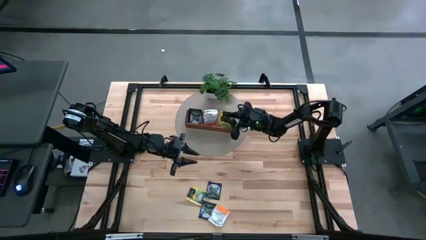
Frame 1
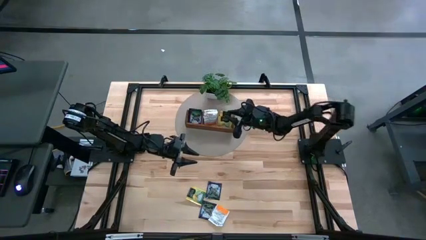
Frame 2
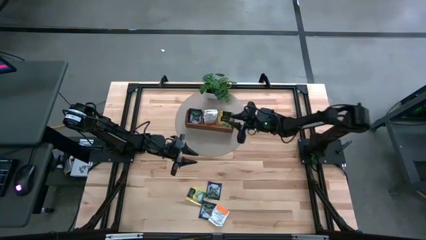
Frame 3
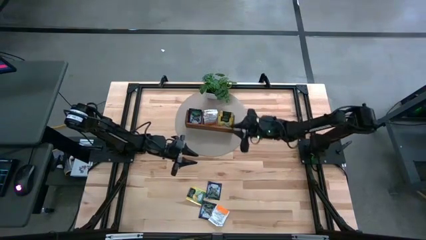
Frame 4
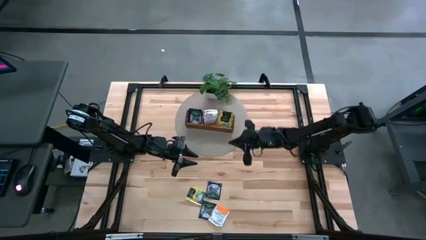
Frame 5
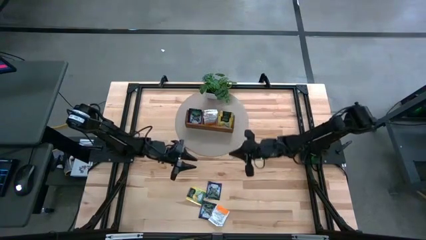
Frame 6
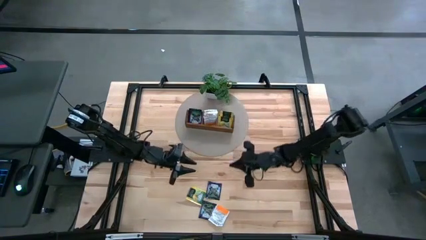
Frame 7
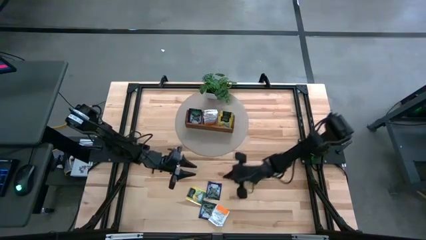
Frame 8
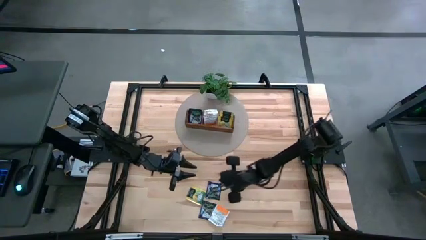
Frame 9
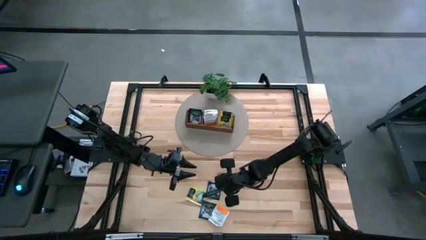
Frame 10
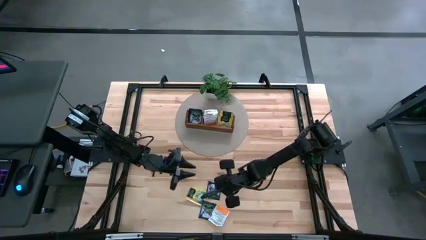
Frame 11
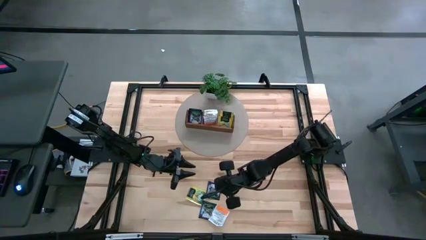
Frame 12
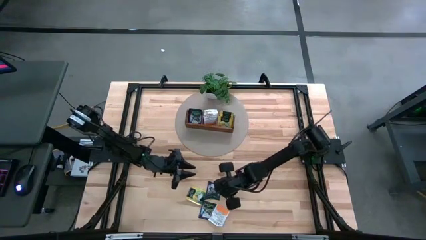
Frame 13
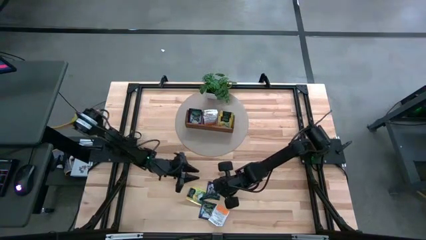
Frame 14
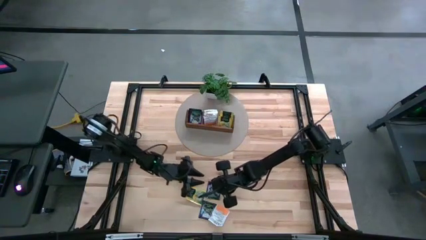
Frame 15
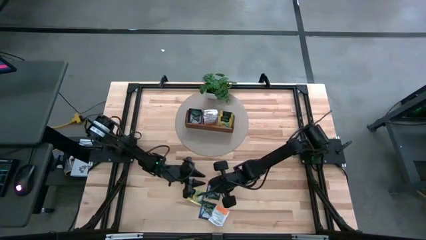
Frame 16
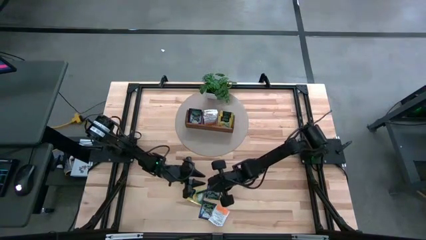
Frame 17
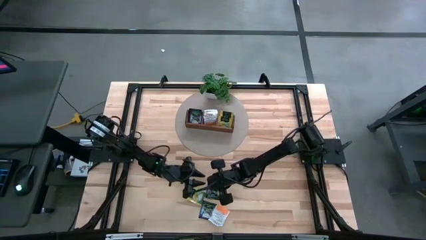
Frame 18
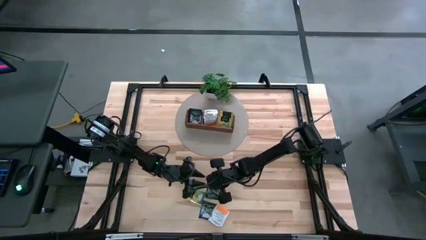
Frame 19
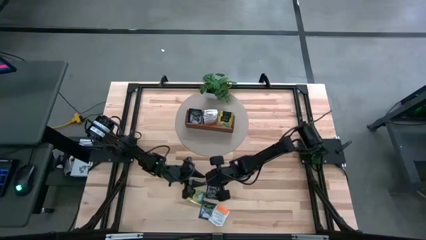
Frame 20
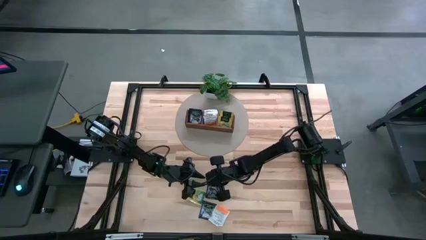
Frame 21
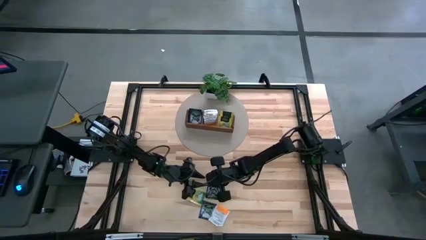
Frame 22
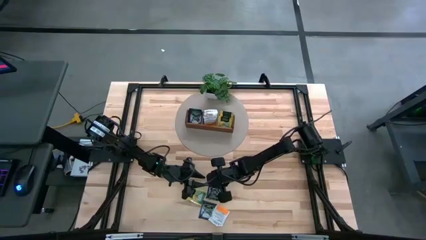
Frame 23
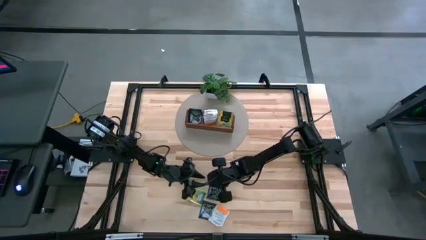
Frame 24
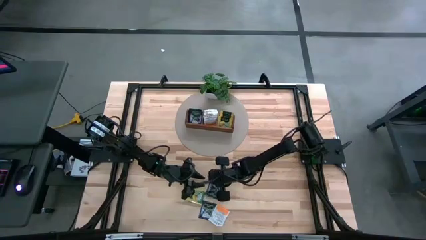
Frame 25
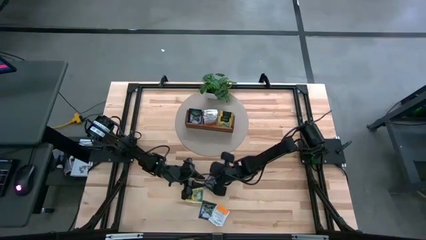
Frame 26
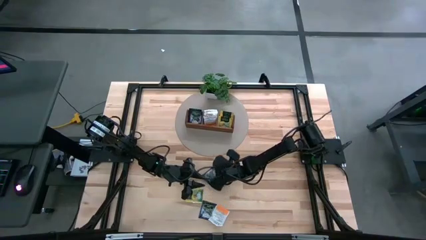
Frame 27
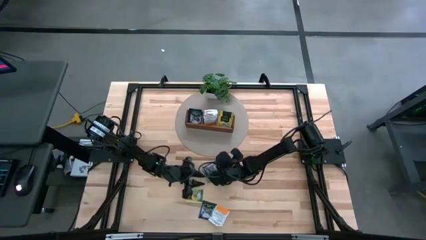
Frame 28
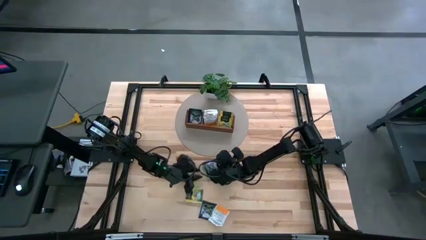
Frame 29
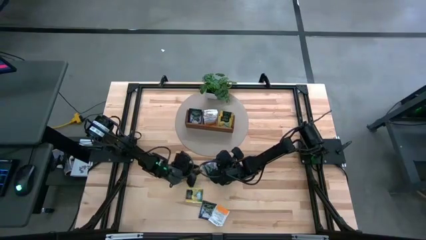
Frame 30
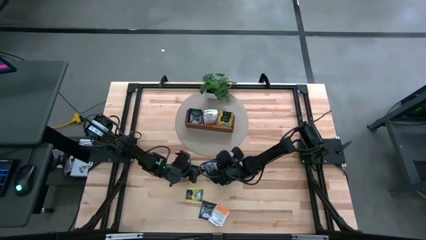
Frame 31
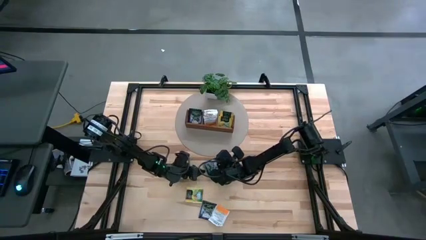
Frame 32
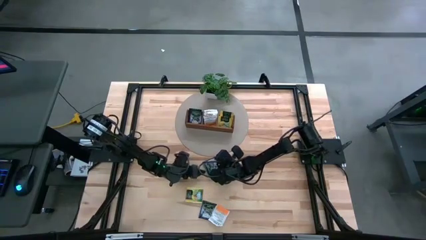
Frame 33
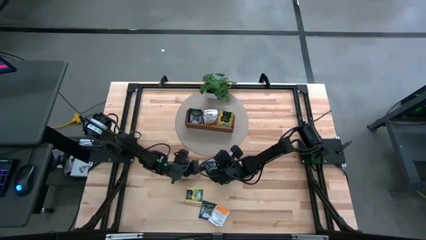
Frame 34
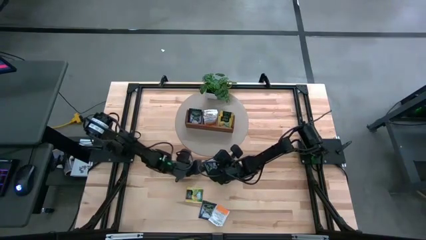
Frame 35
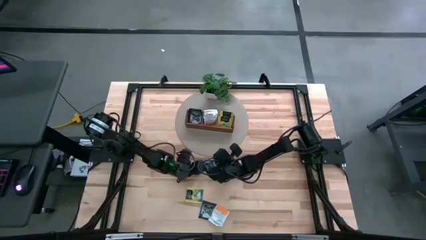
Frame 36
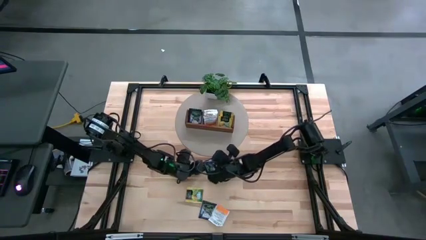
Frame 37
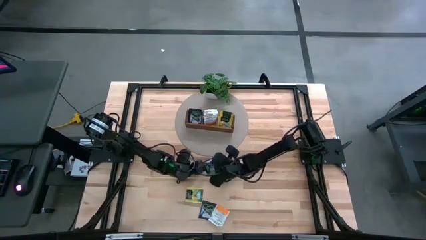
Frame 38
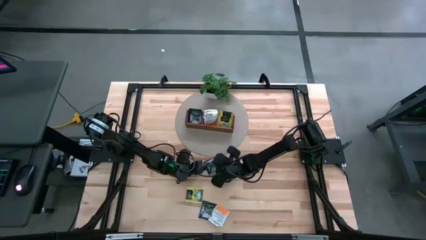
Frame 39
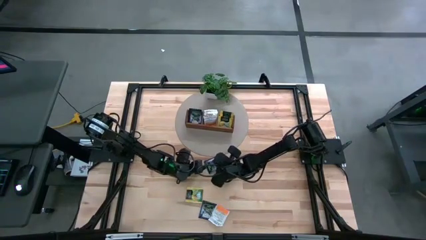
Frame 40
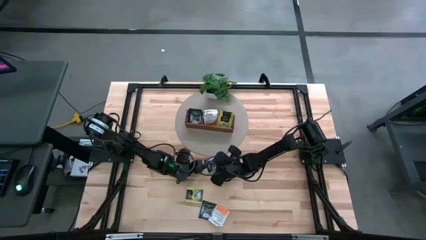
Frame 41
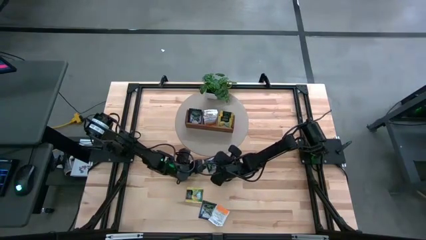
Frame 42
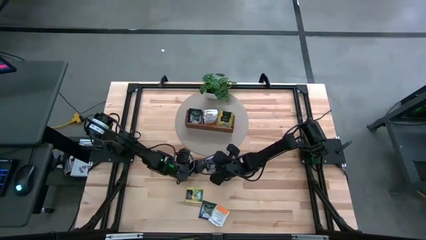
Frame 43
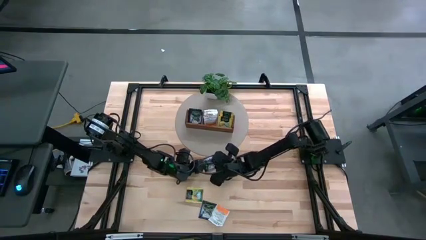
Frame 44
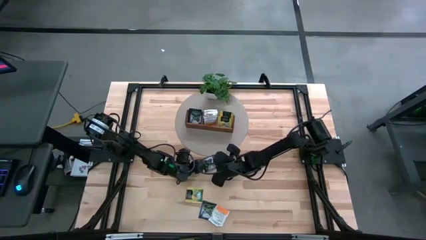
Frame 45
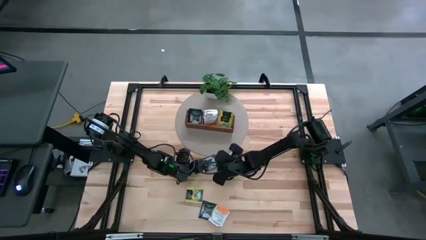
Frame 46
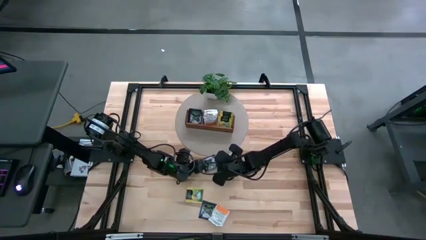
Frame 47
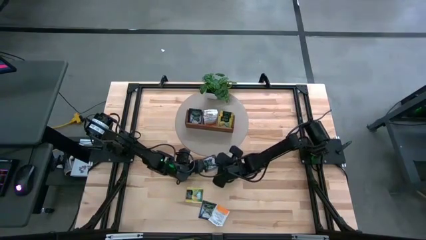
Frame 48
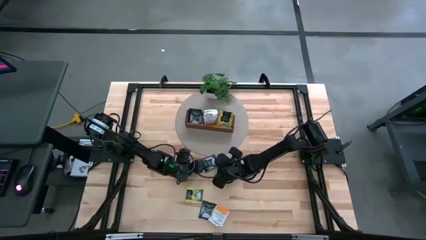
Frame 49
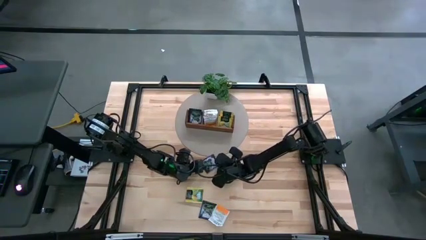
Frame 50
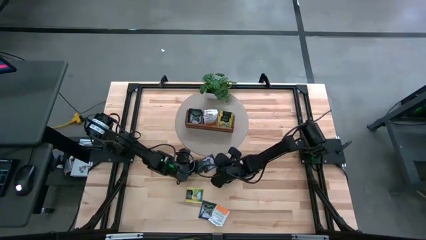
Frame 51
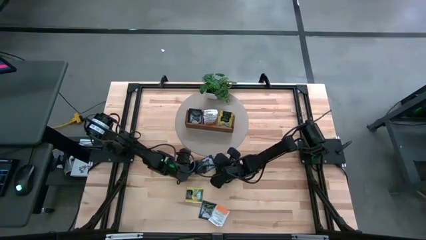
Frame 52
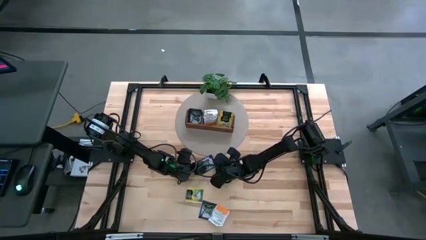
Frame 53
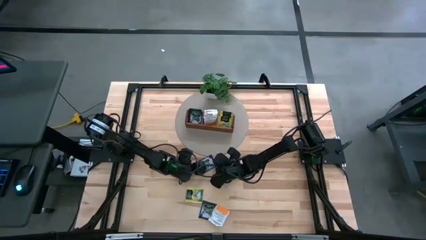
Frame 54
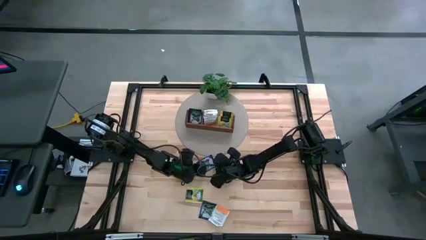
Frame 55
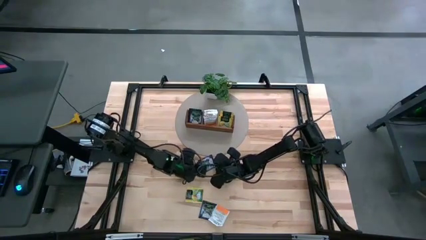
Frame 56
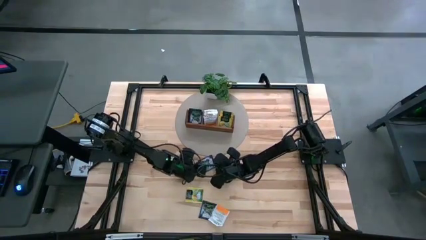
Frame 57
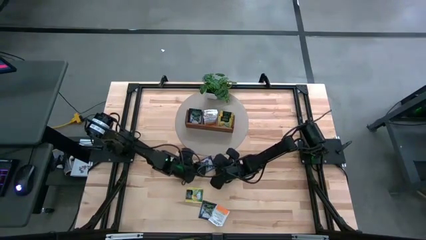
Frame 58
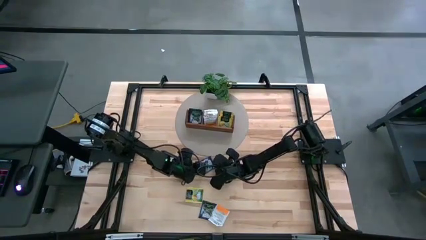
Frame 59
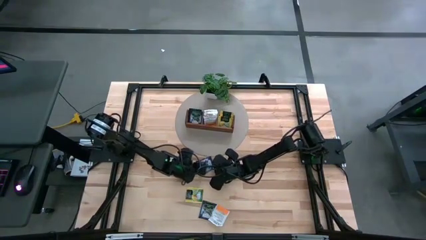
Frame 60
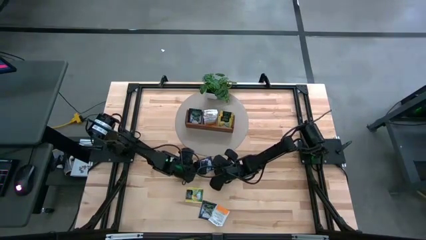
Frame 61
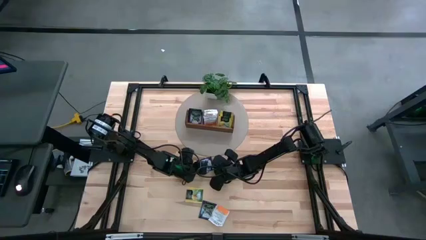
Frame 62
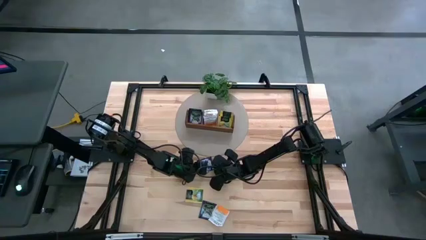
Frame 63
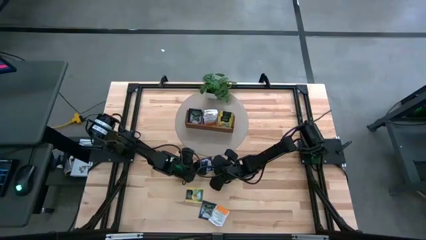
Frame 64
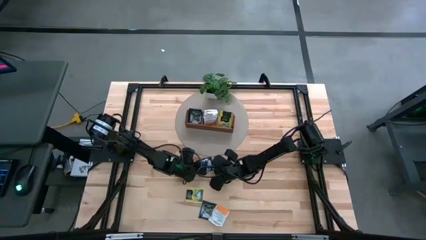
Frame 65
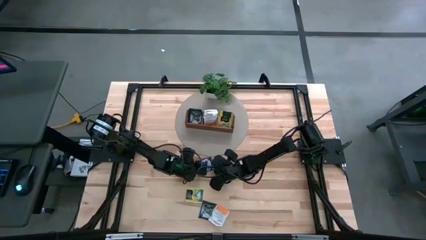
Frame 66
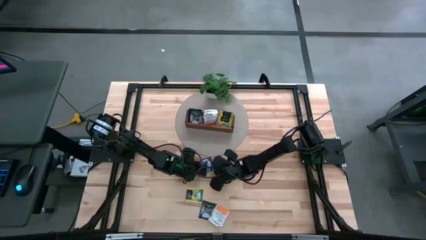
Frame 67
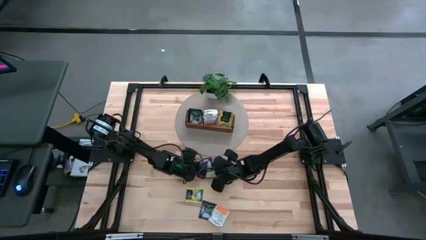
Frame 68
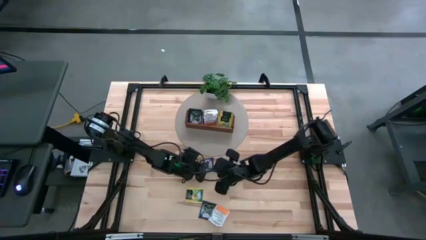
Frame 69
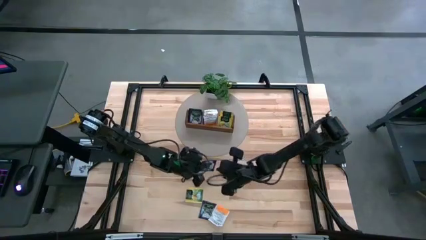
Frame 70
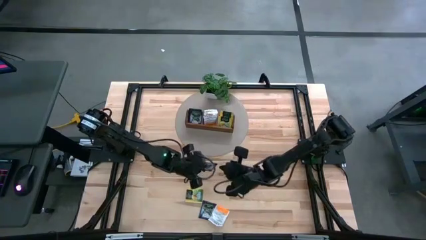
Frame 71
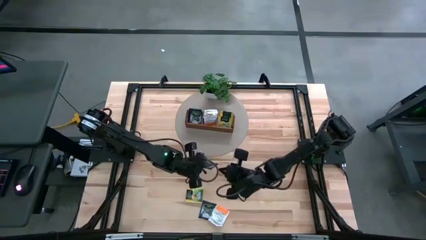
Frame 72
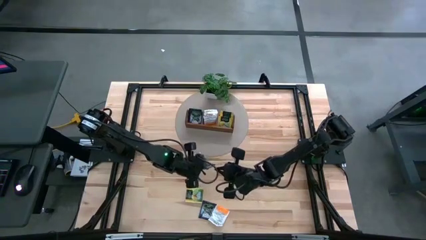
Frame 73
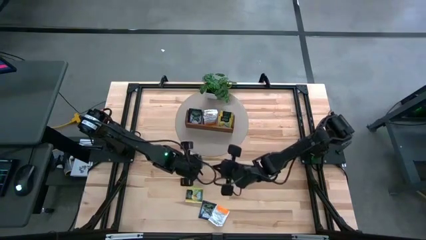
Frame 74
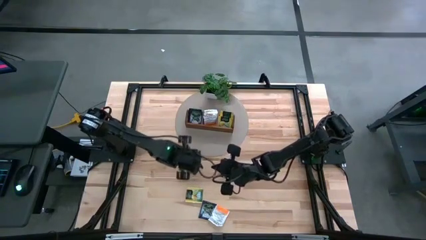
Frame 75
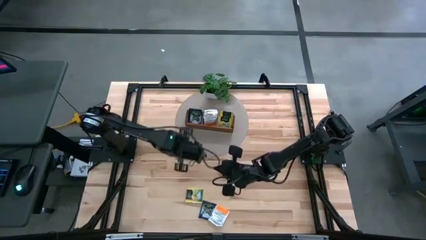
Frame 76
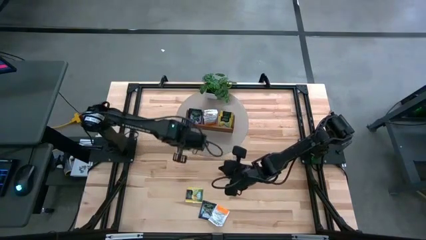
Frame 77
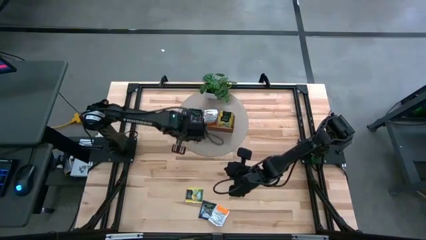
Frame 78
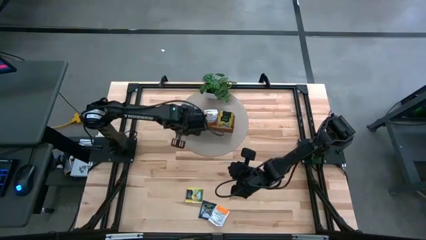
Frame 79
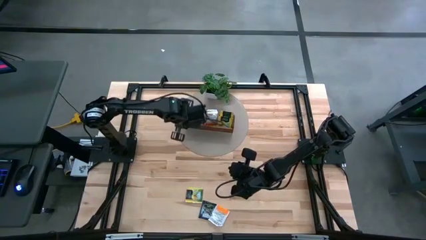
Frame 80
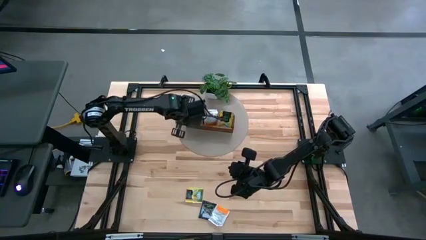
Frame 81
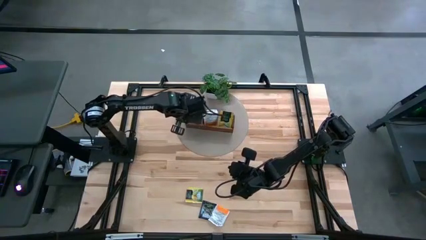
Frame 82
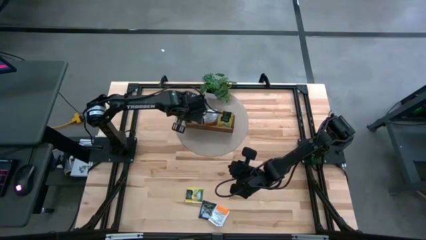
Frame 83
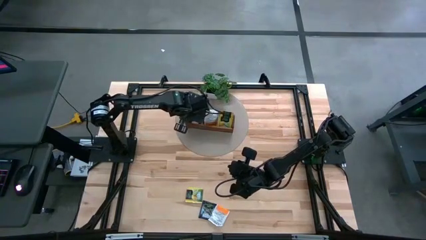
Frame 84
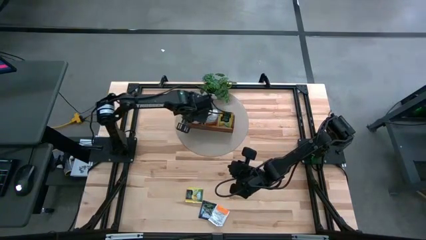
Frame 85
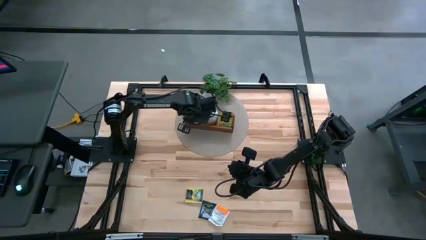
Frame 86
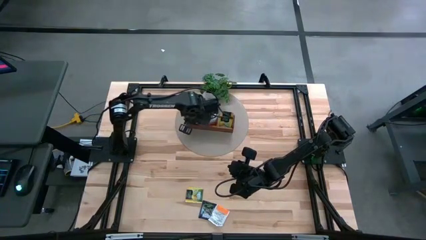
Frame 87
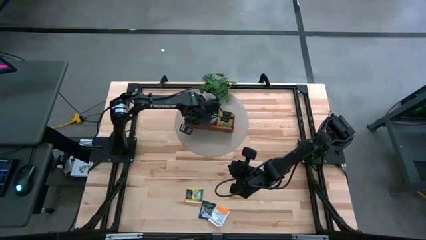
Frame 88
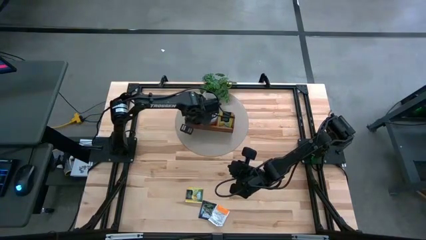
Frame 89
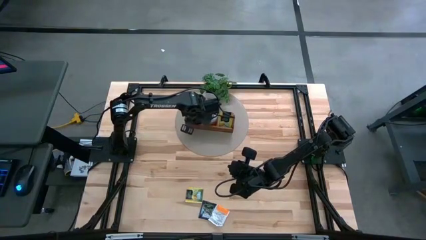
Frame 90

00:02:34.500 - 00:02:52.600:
Task: Pick & Place Tea
Put the top purple tea bag into the left section of the wooden organizer
